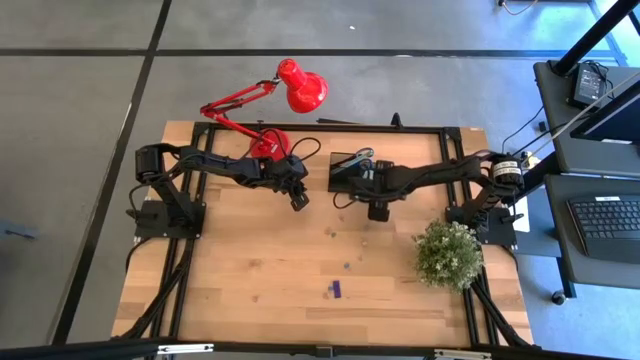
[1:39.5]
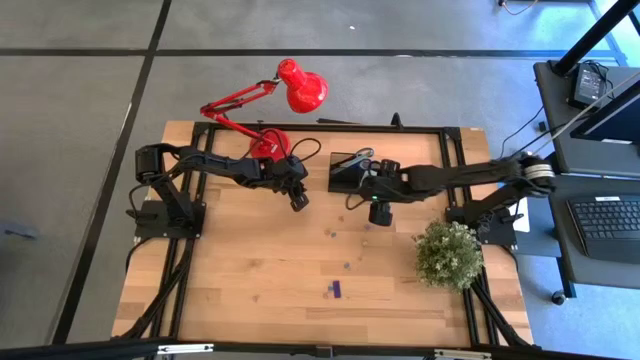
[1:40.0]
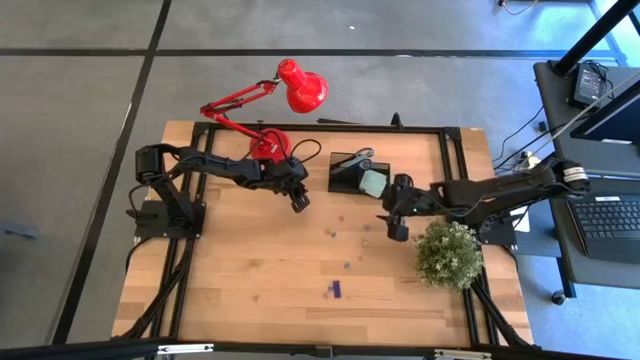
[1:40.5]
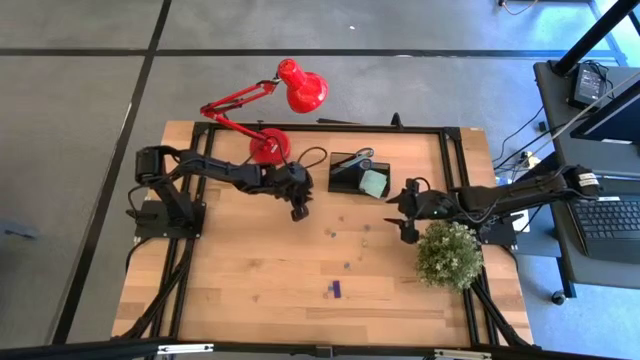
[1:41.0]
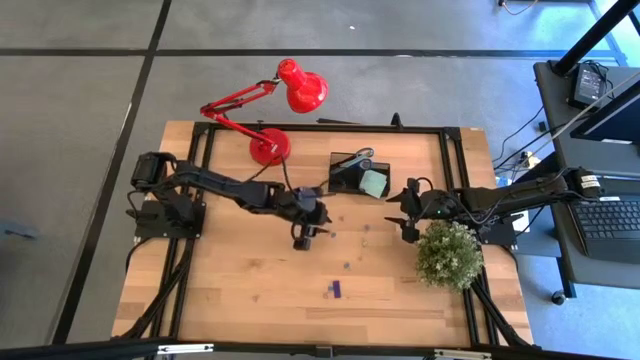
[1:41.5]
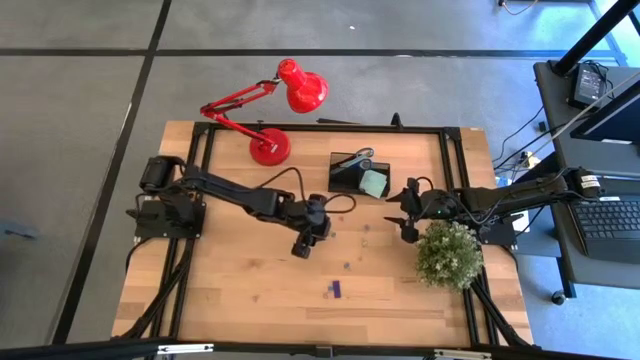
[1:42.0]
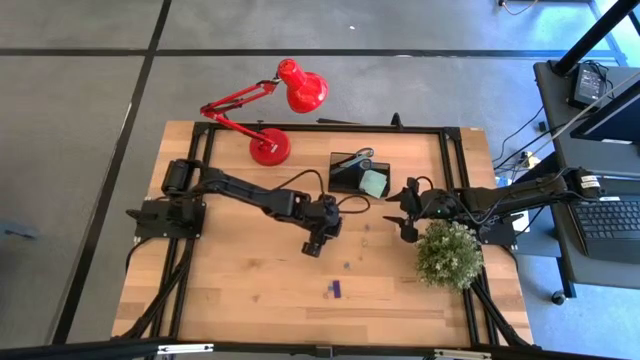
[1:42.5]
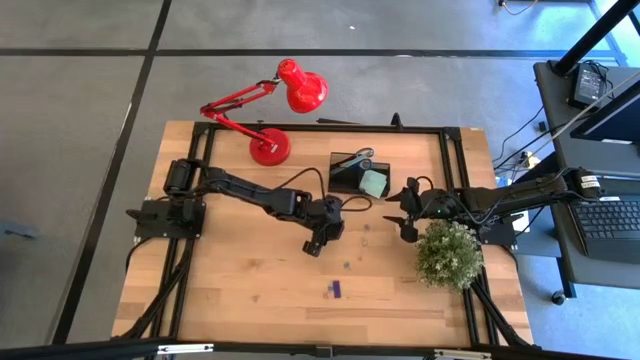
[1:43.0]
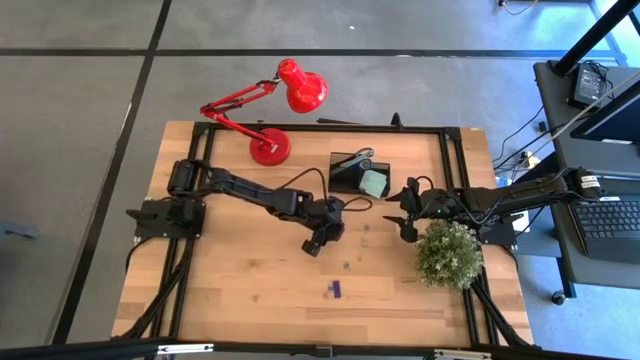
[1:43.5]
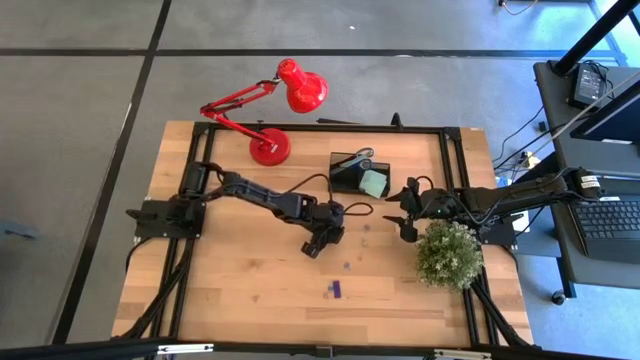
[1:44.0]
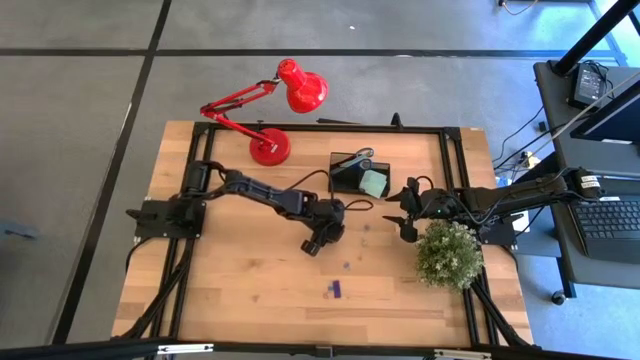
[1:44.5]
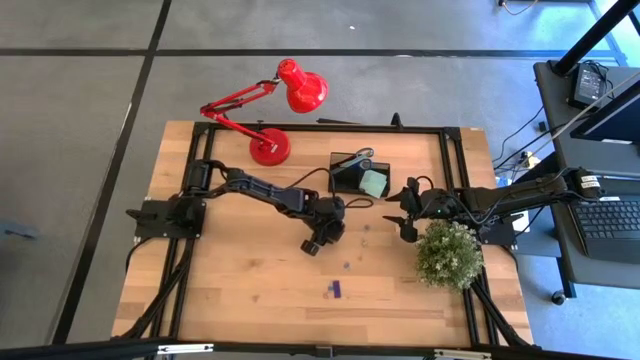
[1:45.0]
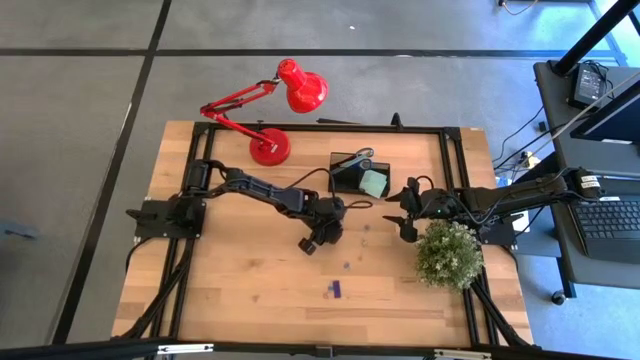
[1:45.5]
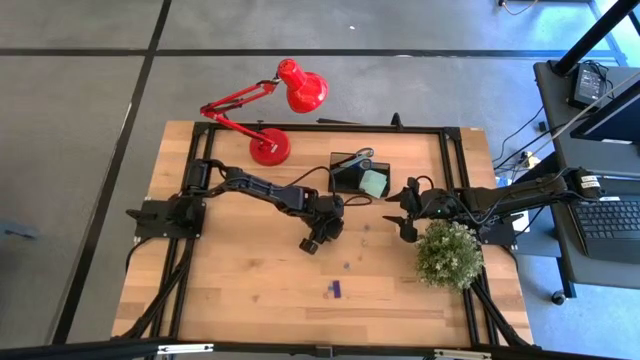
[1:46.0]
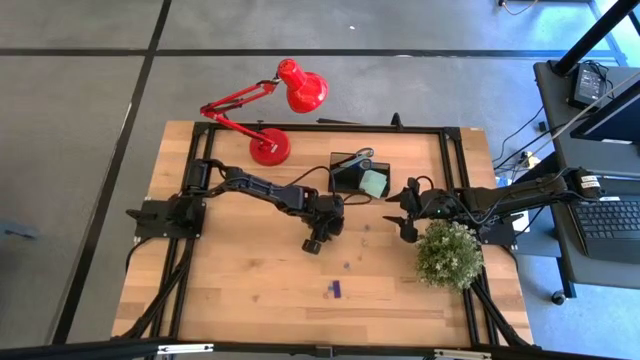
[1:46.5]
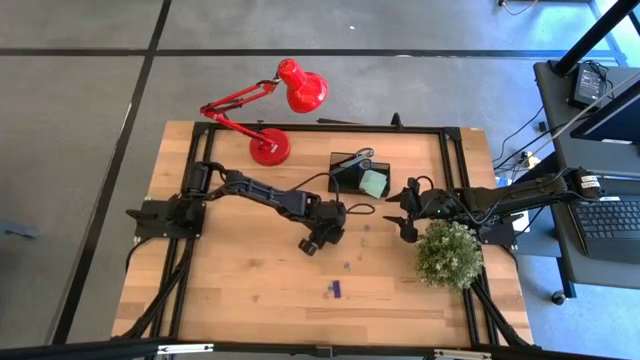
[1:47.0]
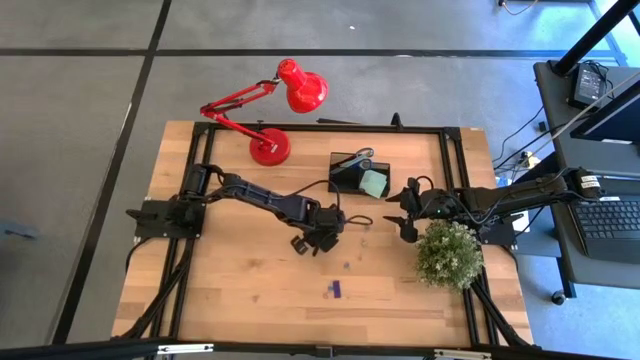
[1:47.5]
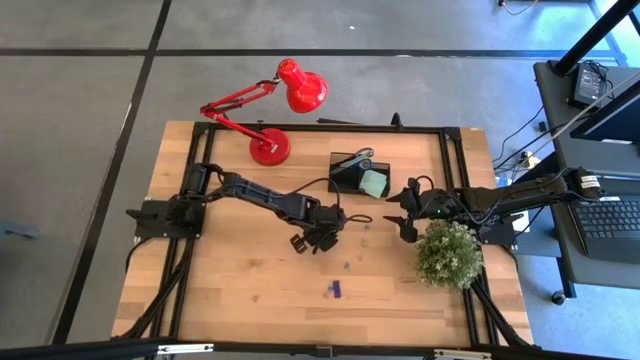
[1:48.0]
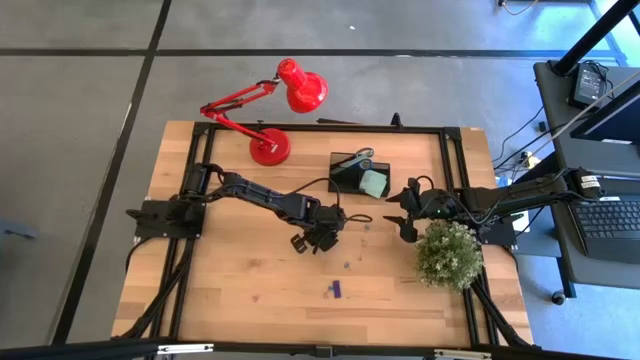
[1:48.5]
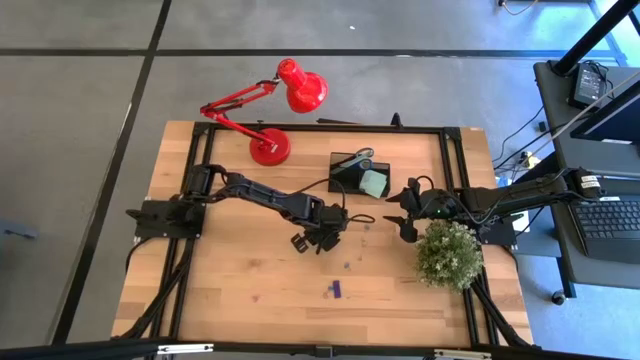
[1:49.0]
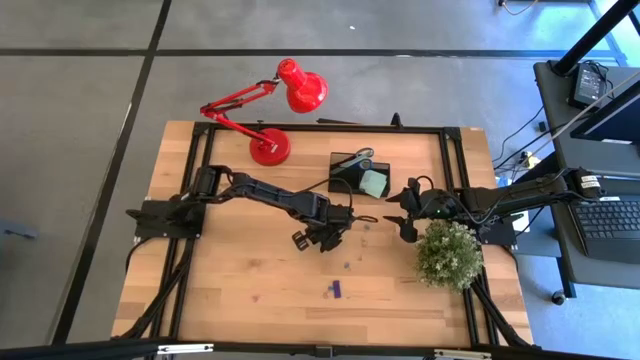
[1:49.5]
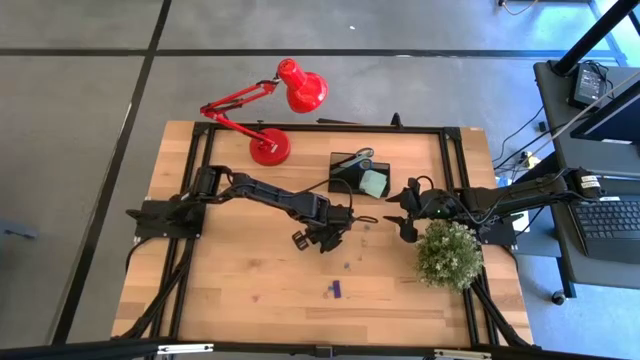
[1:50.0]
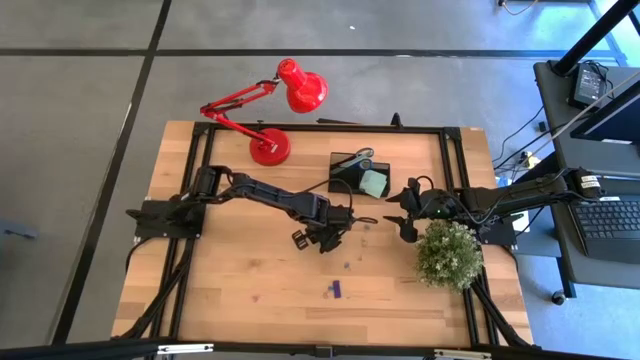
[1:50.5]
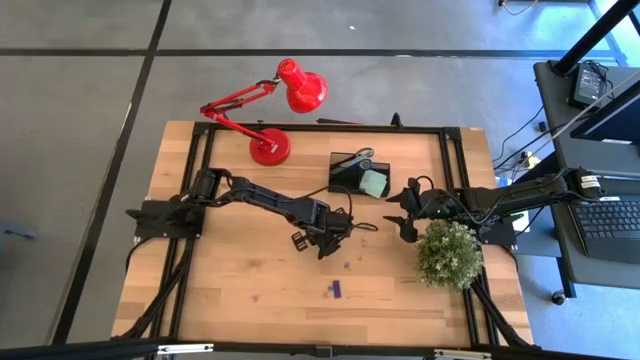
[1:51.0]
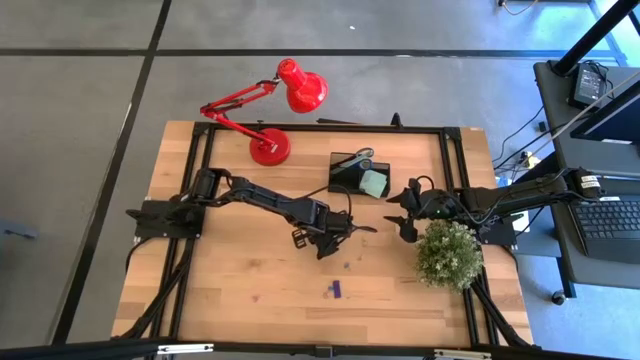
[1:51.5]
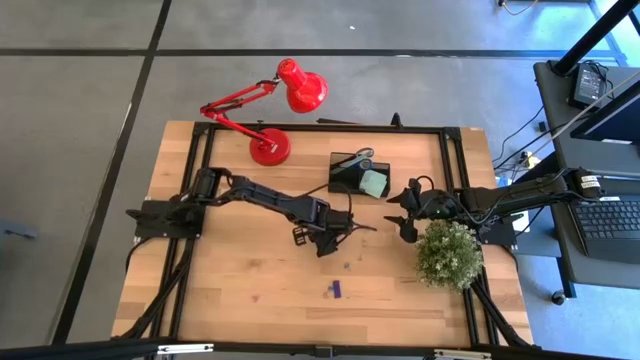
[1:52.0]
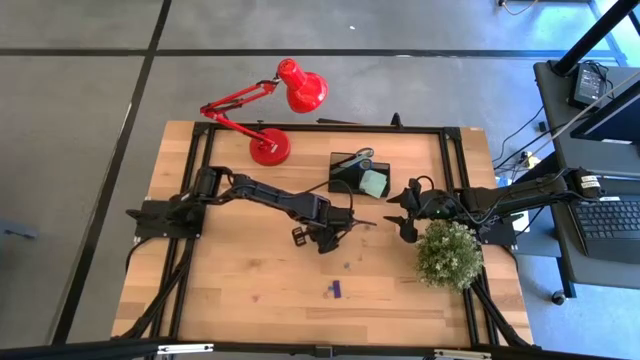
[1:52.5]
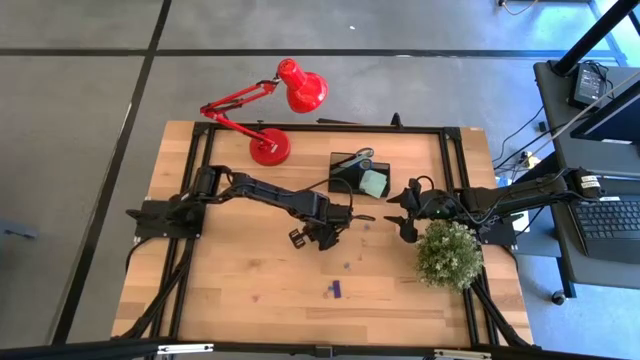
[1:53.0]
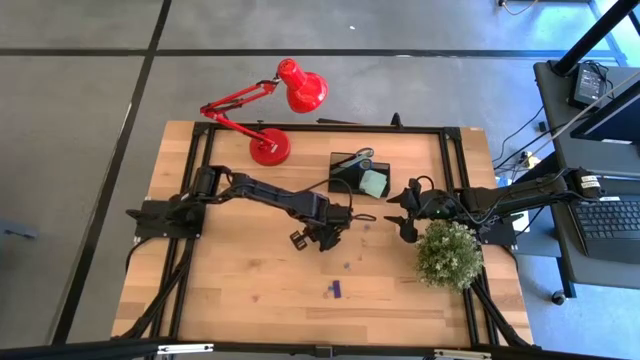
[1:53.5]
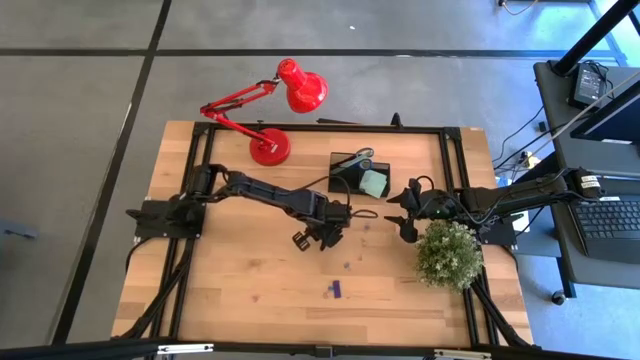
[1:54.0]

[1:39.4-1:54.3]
Task: Pick and place office supplies into organizer
Put the blue binder clip into the black desk organizer

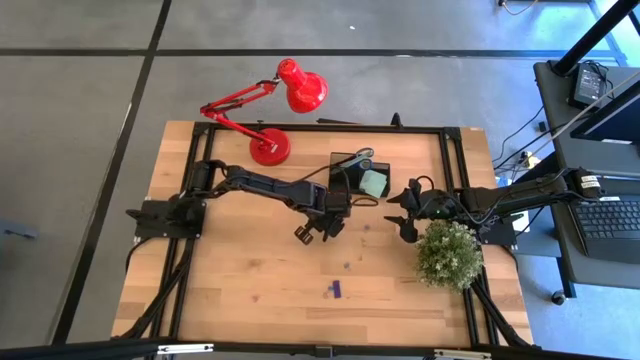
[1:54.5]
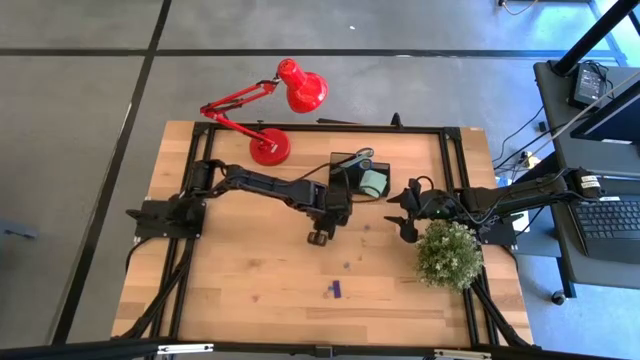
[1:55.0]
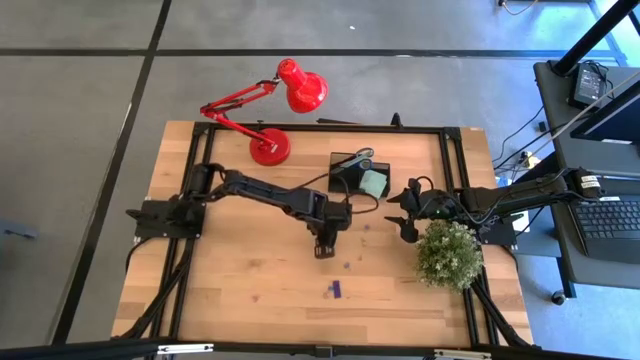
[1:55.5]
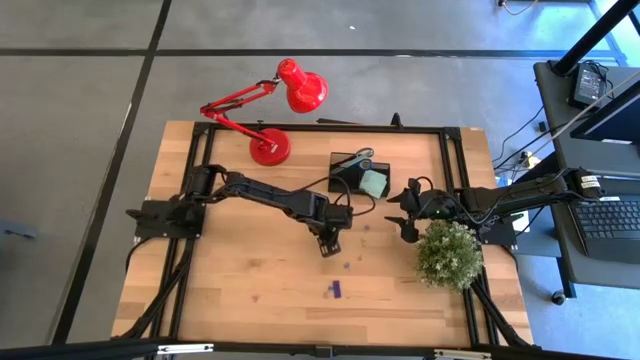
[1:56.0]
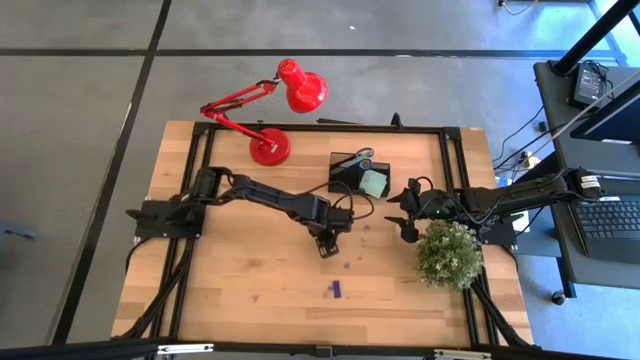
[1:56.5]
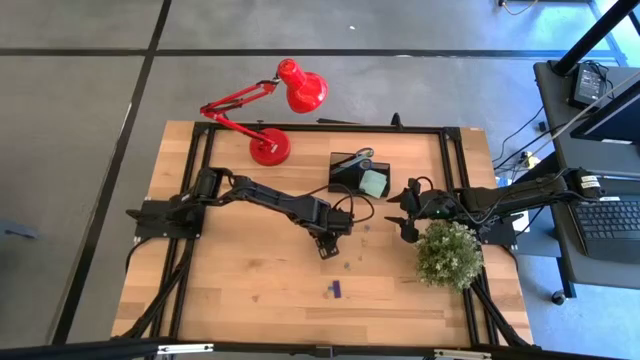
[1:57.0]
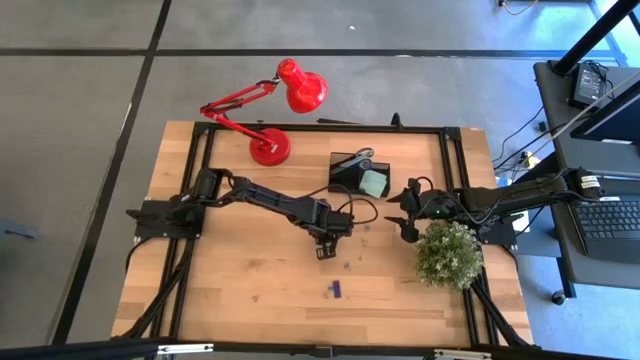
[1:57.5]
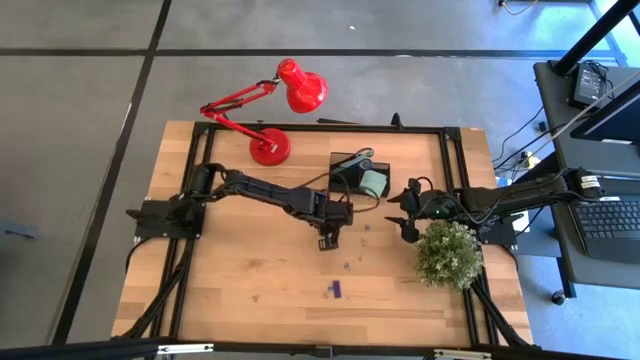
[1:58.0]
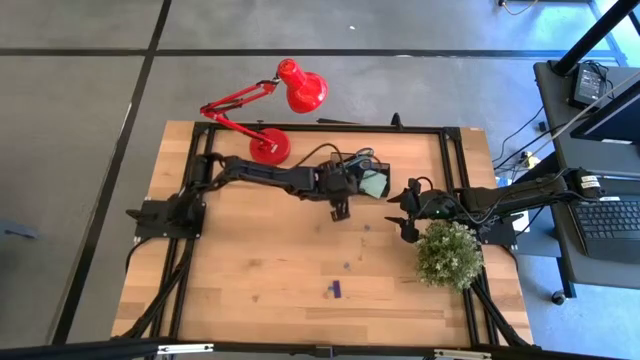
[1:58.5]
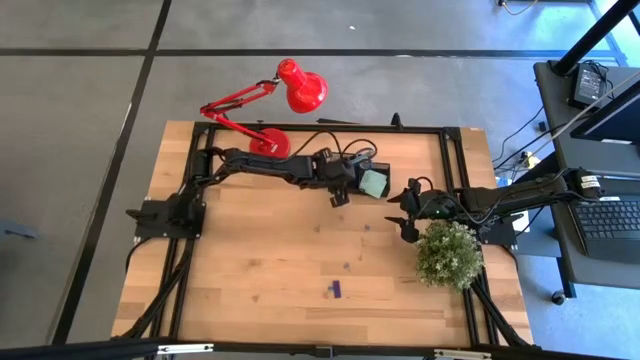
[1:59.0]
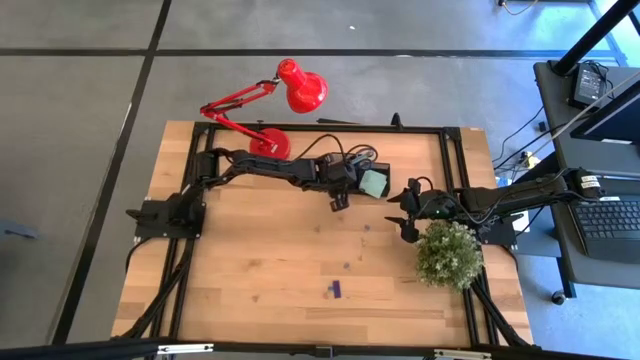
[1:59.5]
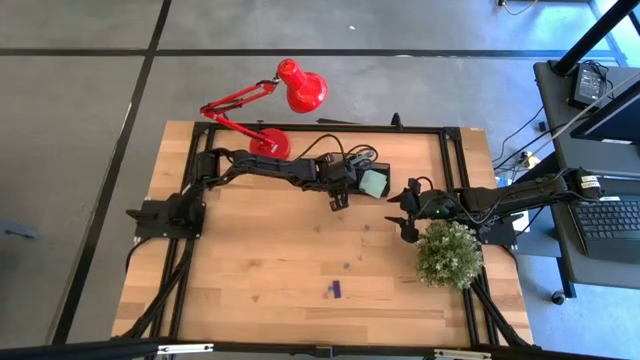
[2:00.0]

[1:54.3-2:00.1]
Put the blue binder clip into the black desk organizer
